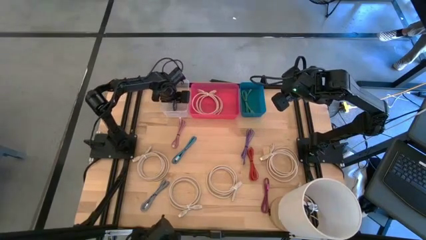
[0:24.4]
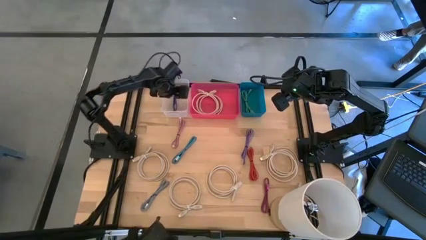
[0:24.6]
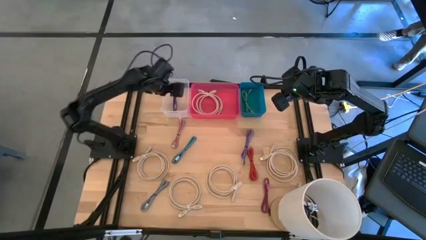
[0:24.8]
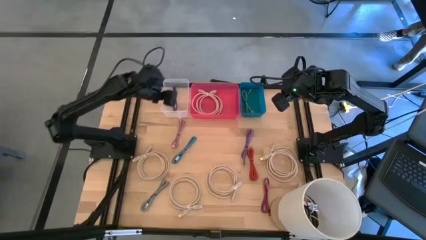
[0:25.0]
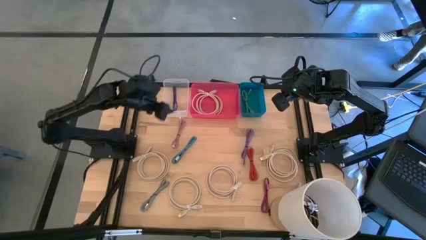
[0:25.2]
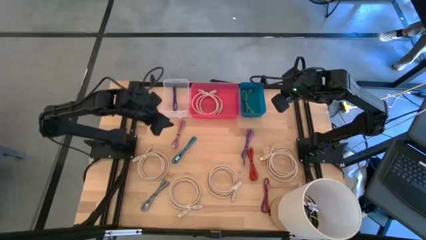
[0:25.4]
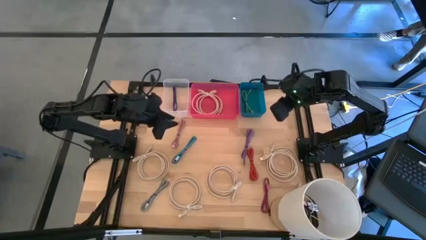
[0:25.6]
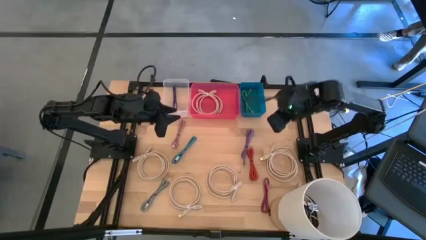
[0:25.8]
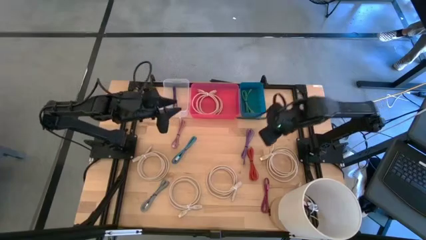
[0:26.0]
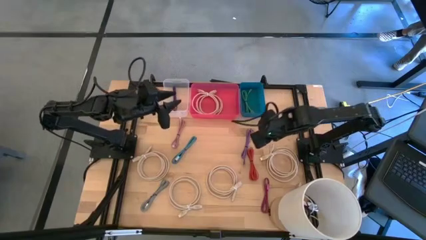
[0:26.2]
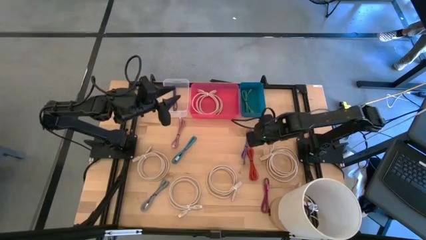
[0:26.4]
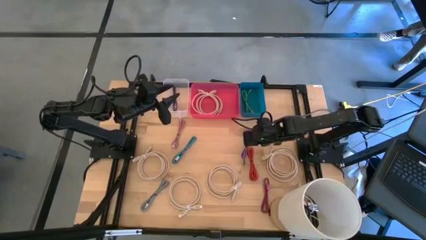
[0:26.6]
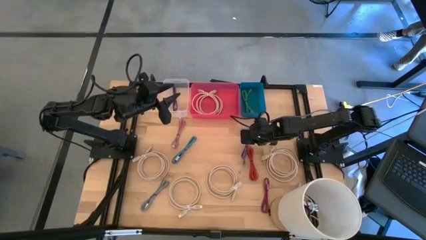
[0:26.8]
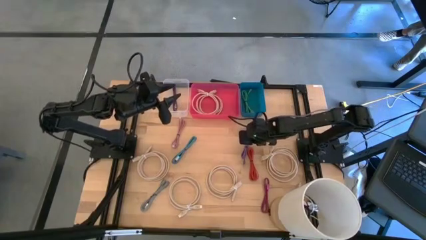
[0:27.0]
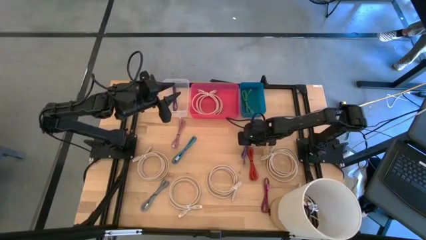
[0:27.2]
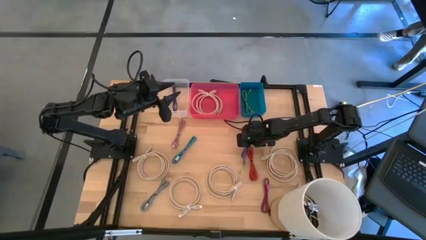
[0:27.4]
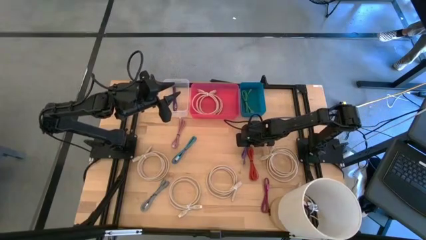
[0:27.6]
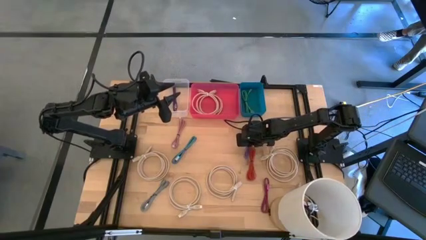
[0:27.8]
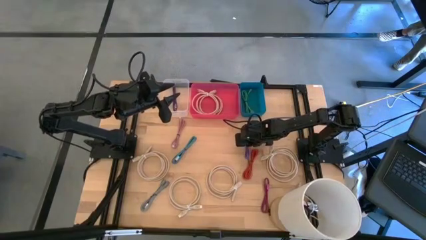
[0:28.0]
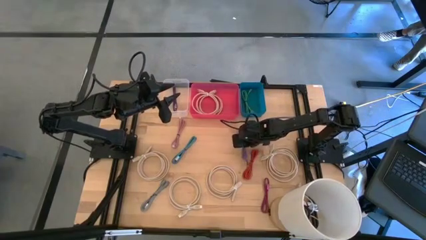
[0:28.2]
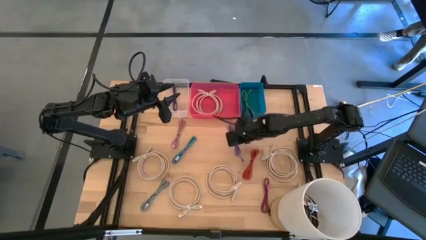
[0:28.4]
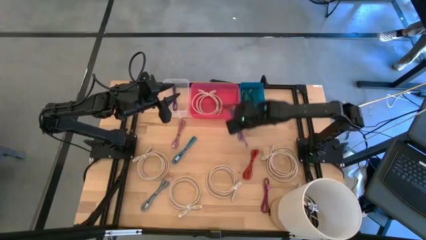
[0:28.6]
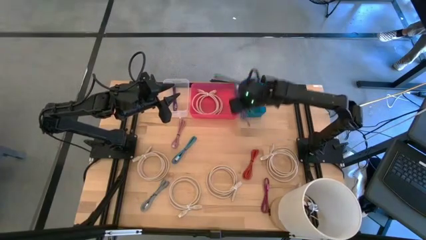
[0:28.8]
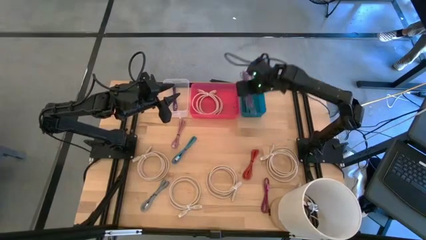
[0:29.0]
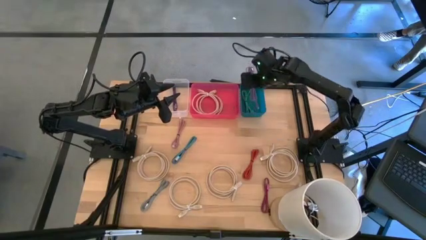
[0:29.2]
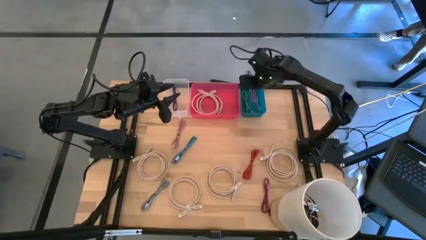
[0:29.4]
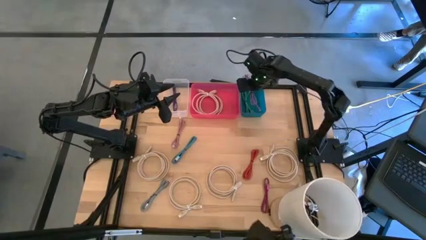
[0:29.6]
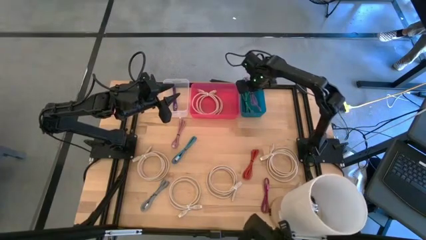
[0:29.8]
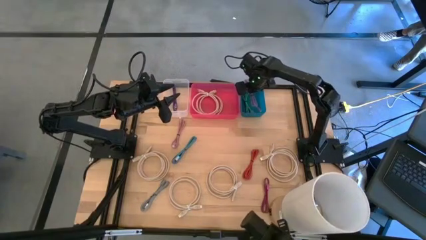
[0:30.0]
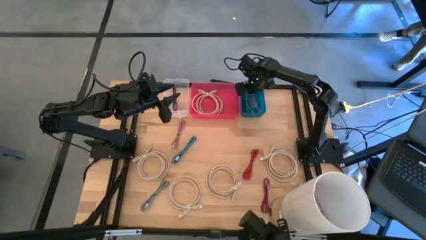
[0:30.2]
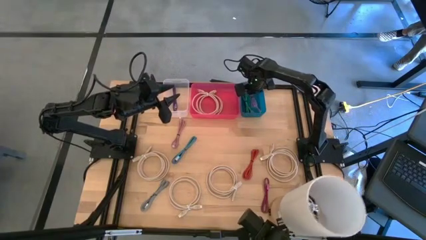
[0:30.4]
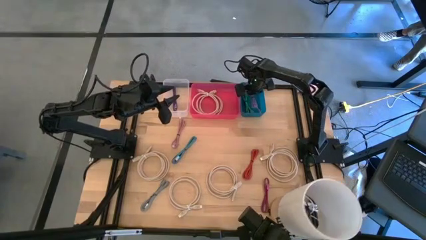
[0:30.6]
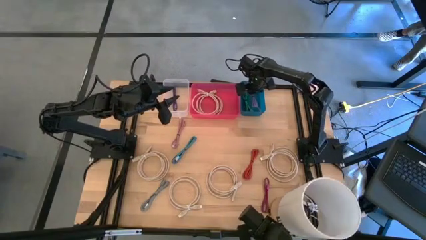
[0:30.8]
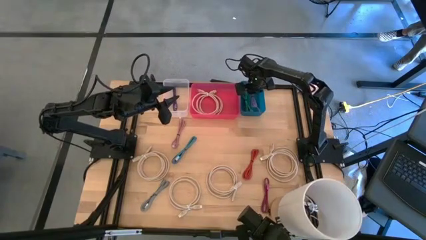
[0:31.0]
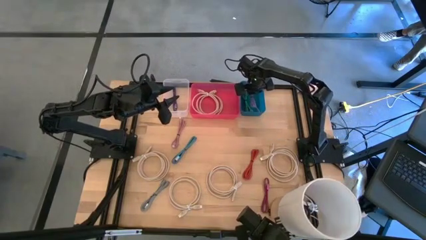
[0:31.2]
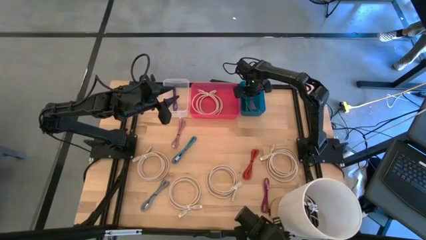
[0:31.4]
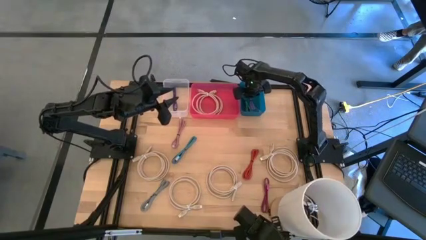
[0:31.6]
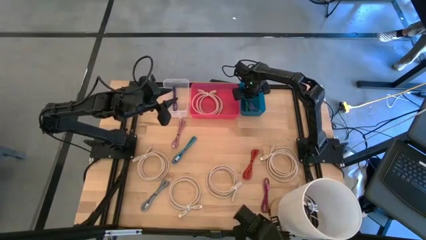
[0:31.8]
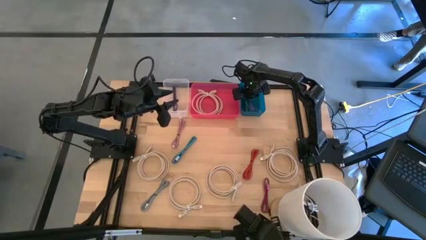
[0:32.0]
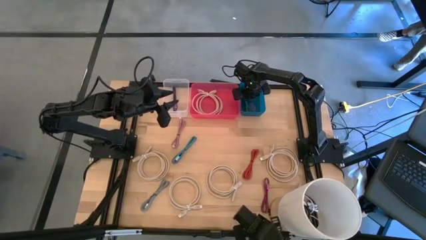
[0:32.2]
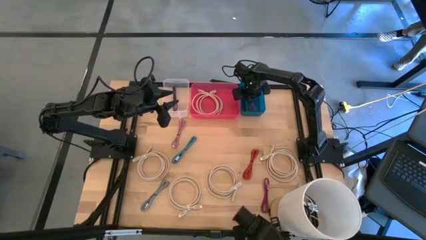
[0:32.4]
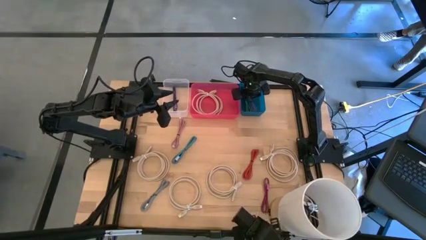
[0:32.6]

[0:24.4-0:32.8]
Task: Pick & Place USB Port
Put the purple charger cable into the blue bin

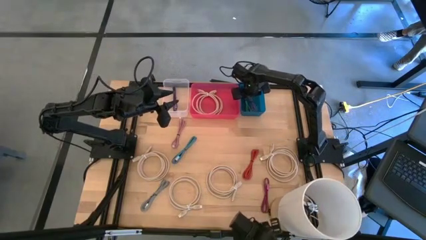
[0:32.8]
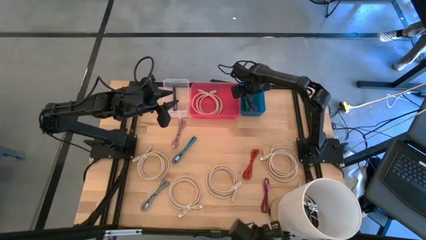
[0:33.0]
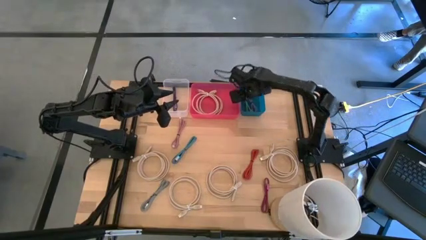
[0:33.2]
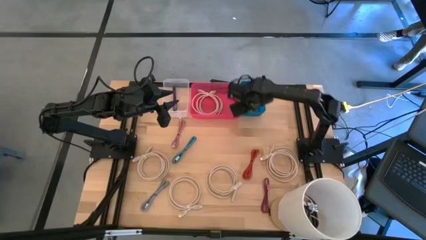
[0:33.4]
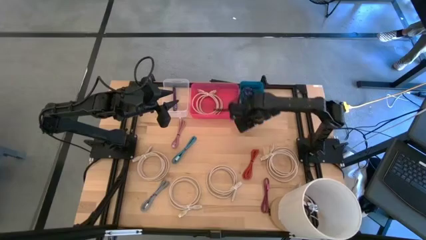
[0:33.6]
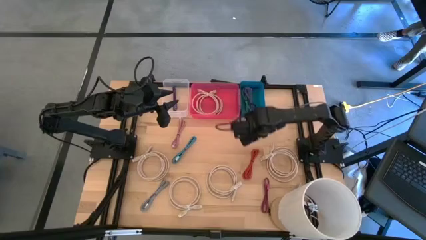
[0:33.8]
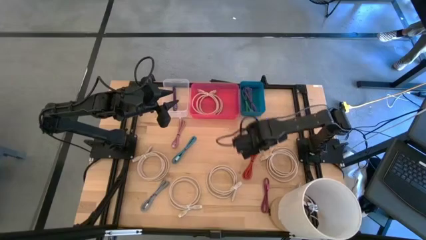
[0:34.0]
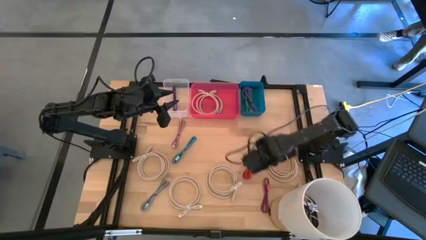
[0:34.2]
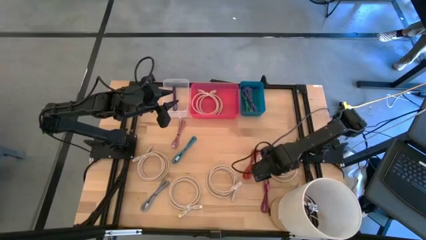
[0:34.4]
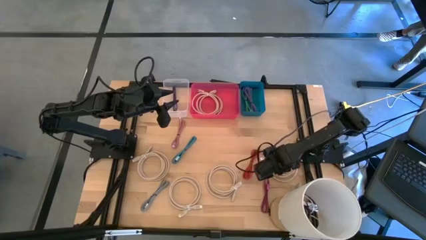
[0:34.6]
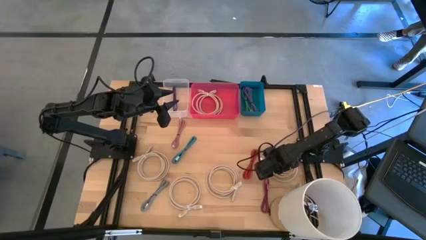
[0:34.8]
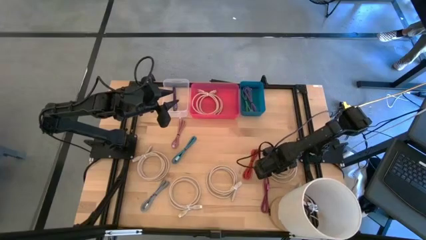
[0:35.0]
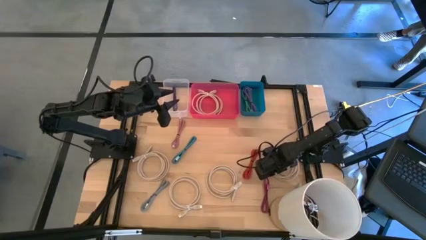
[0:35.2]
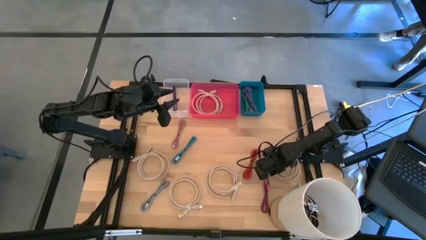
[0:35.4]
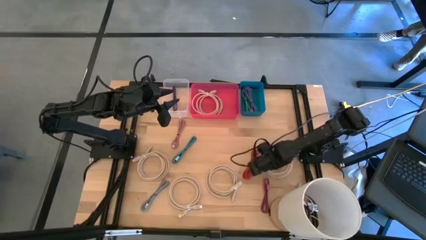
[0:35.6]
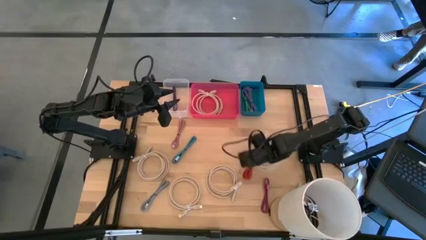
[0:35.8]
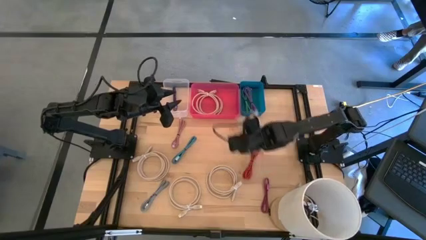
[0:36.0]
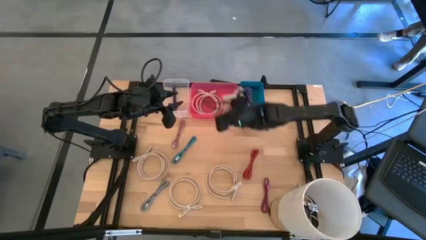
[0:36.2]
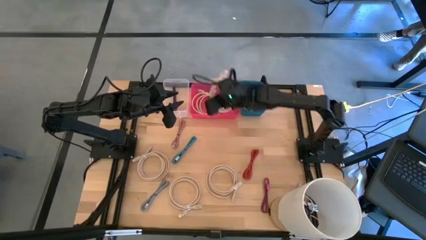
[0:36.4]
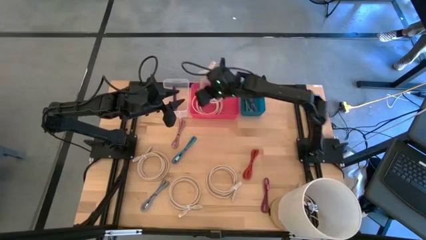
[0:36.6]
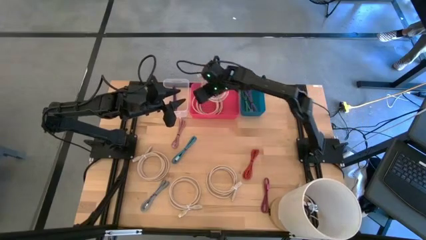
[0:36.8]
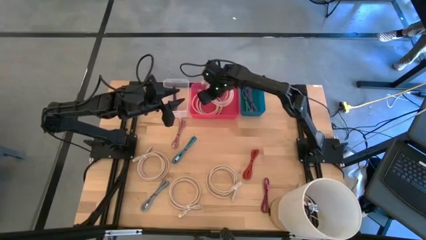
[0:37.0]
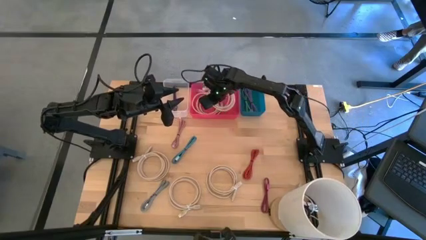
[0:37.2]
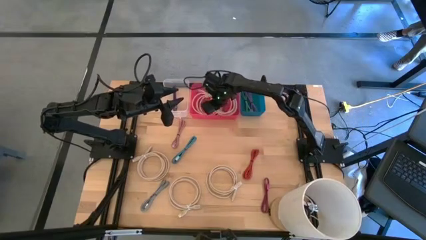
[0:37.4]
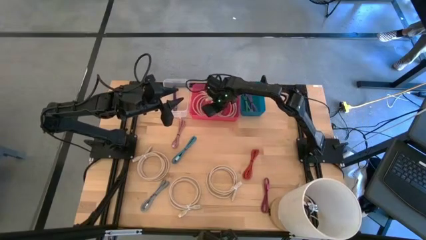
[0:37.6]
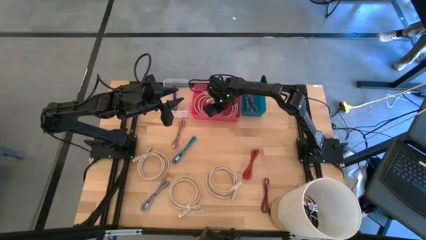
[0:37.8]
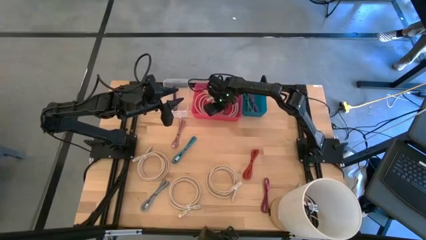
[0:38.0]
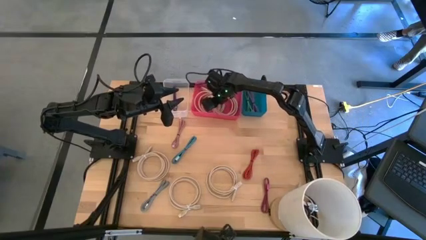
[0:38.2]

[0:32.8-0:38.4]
Put the light brown HDMI cable into the pink bin
